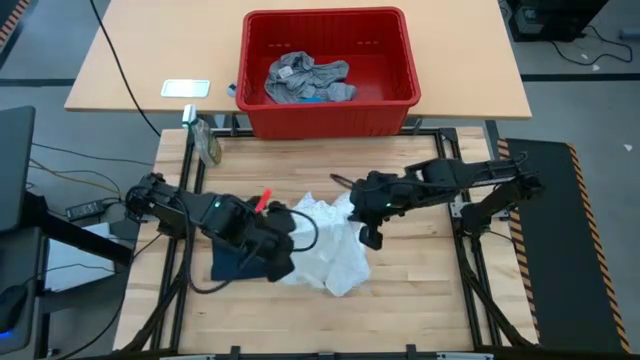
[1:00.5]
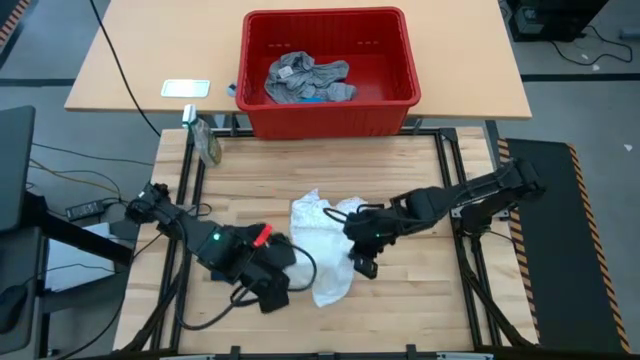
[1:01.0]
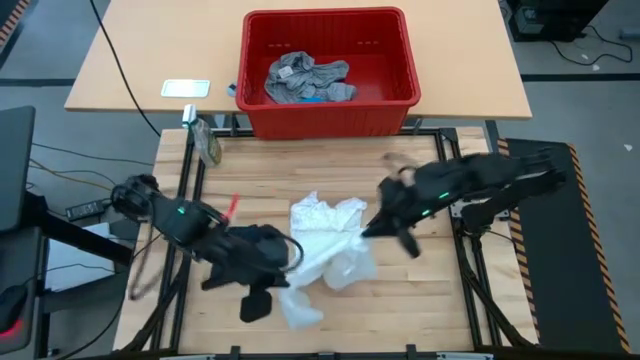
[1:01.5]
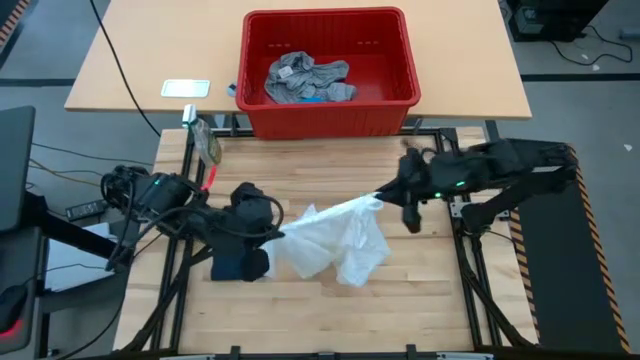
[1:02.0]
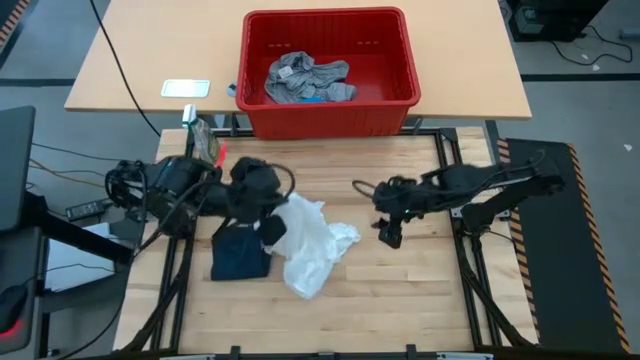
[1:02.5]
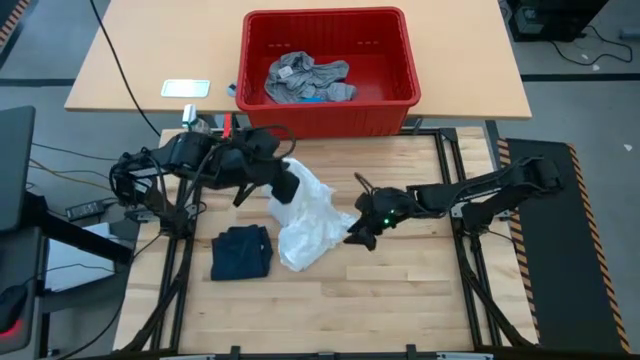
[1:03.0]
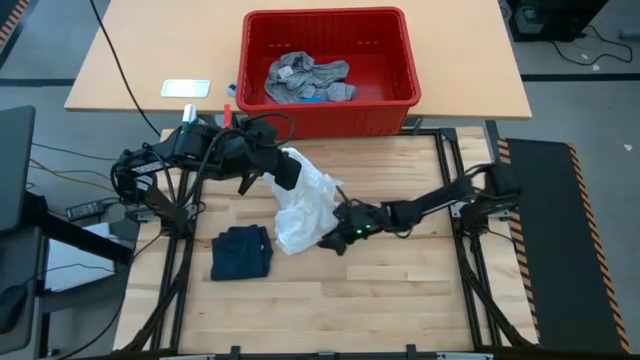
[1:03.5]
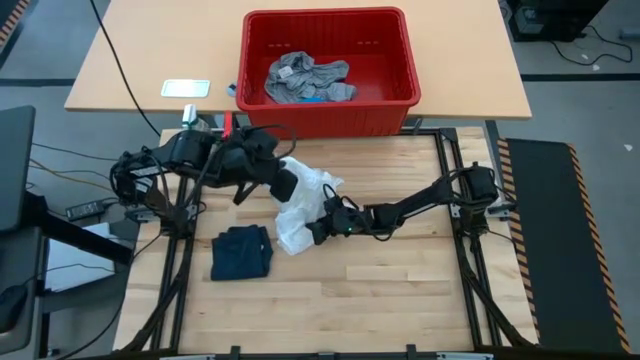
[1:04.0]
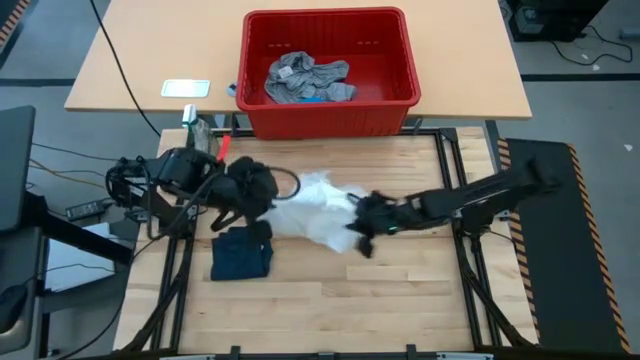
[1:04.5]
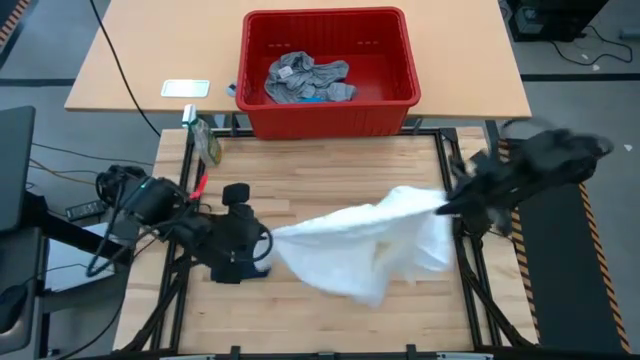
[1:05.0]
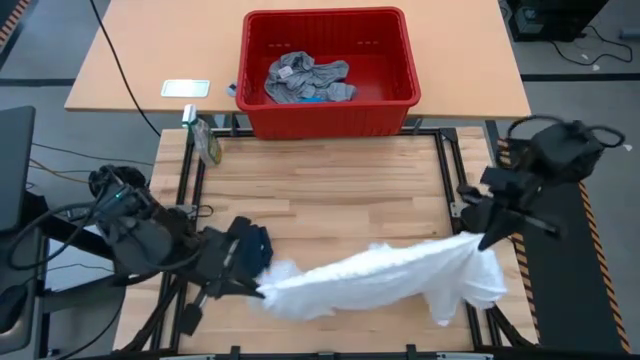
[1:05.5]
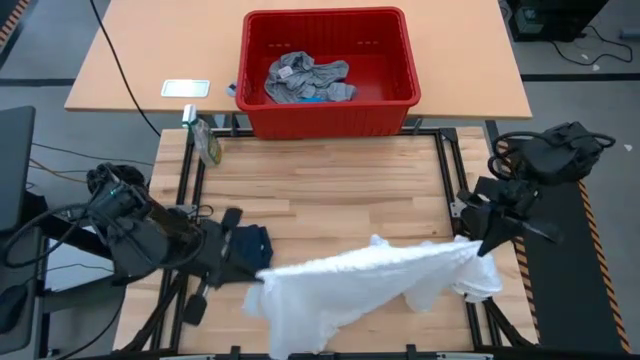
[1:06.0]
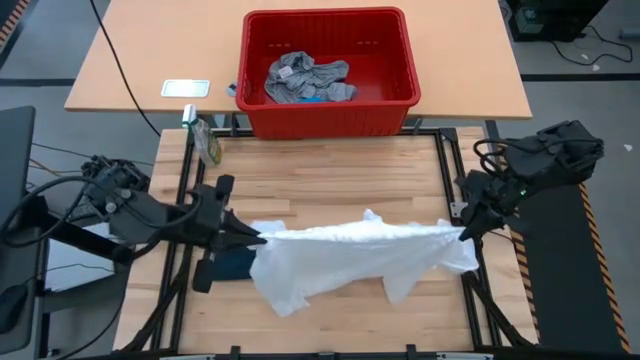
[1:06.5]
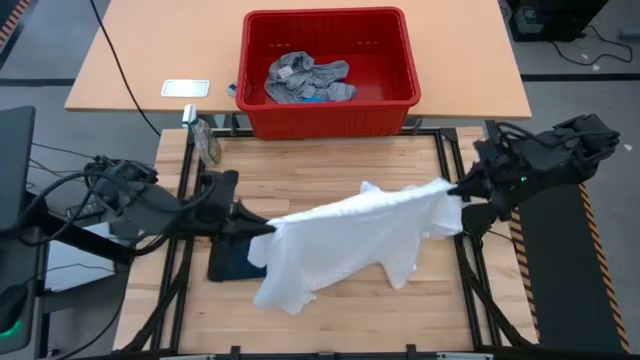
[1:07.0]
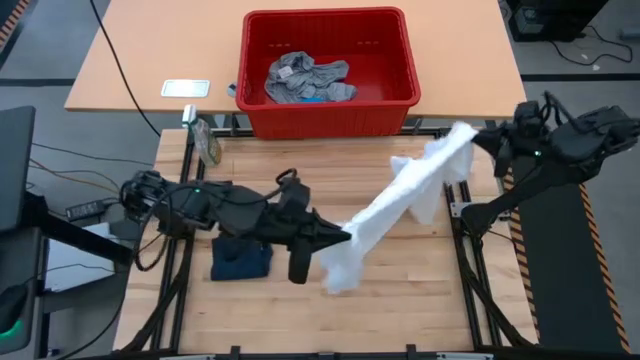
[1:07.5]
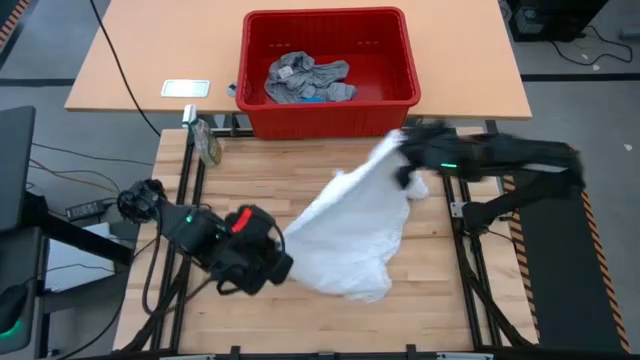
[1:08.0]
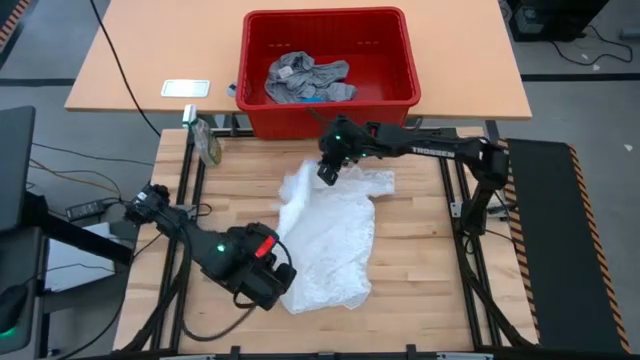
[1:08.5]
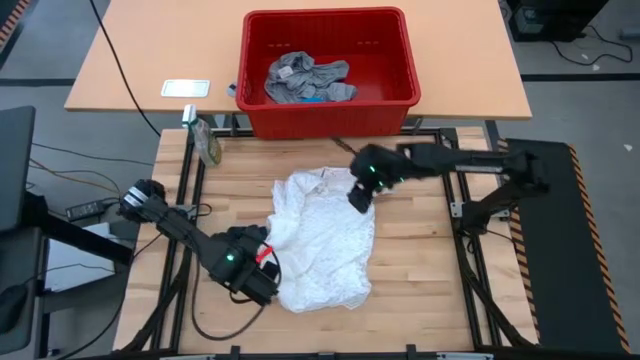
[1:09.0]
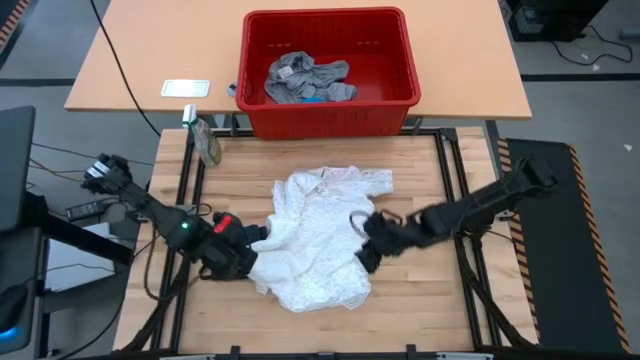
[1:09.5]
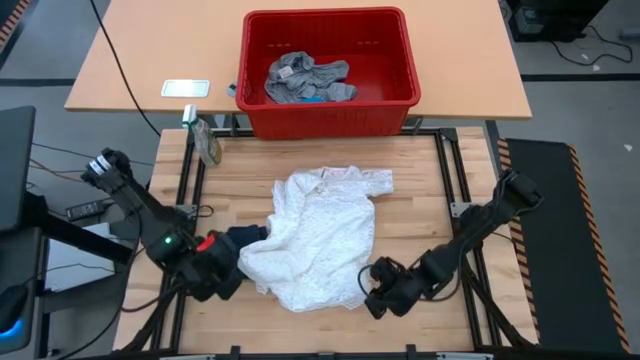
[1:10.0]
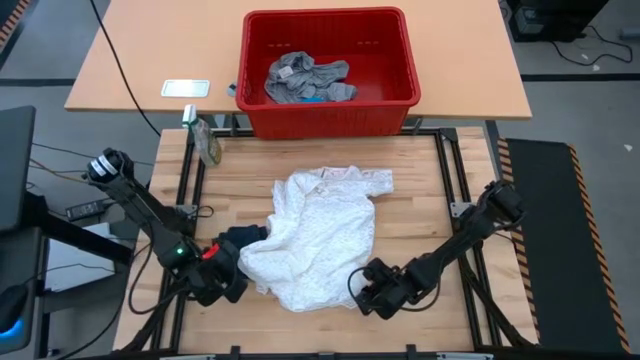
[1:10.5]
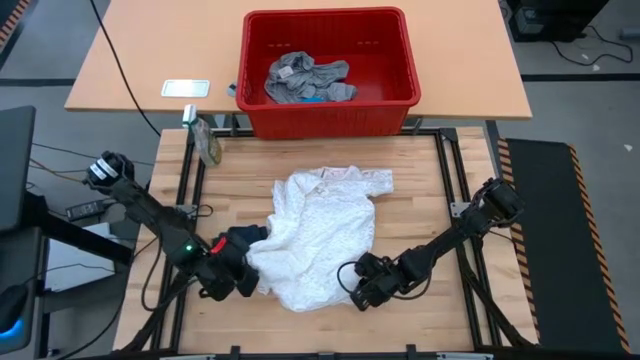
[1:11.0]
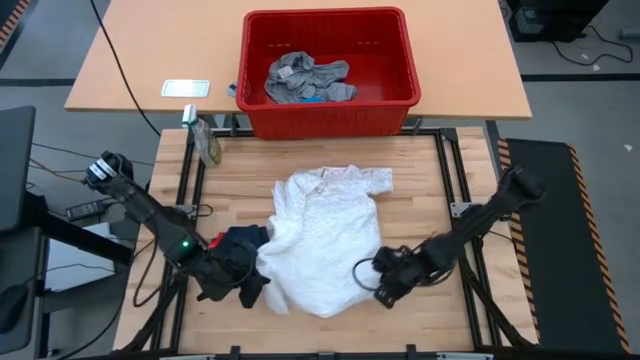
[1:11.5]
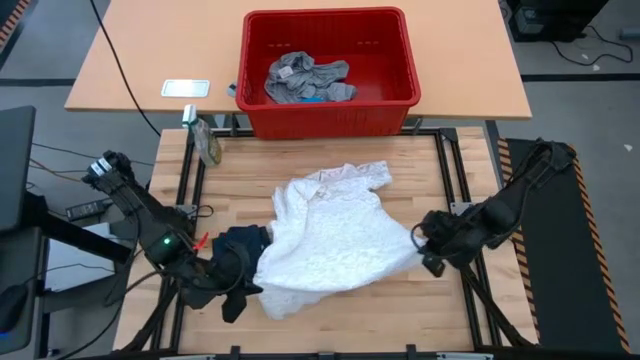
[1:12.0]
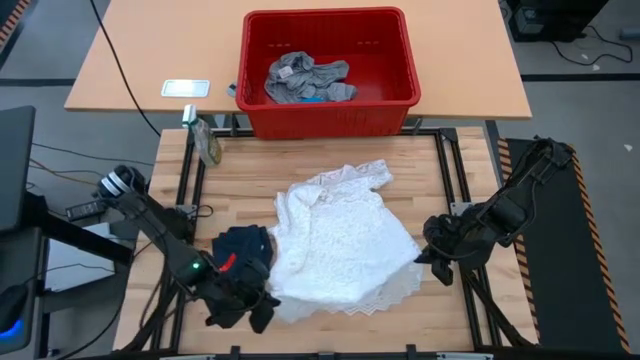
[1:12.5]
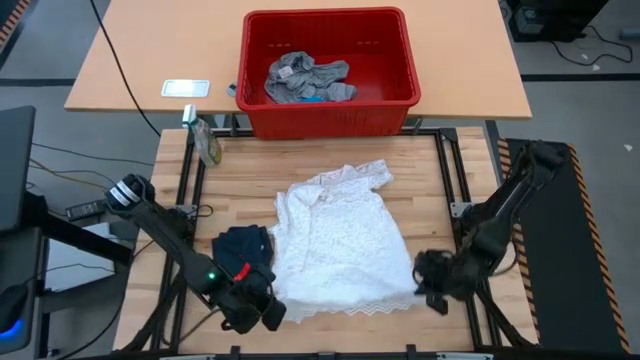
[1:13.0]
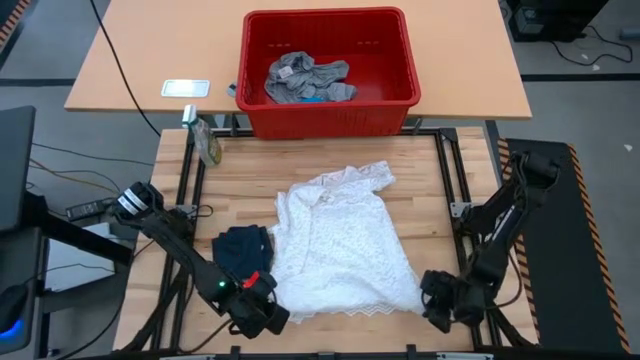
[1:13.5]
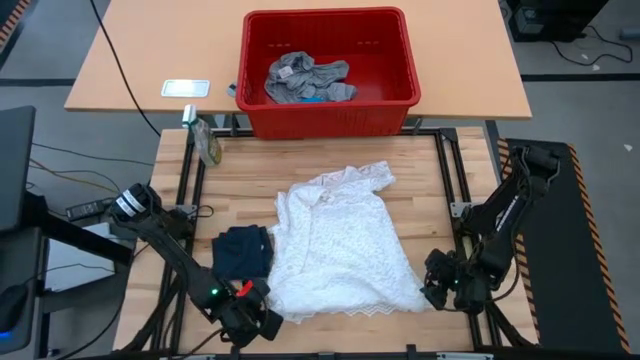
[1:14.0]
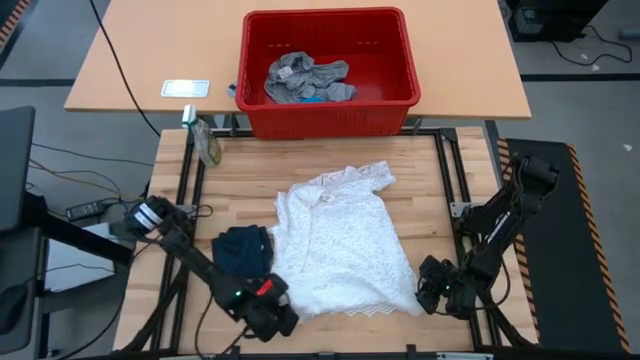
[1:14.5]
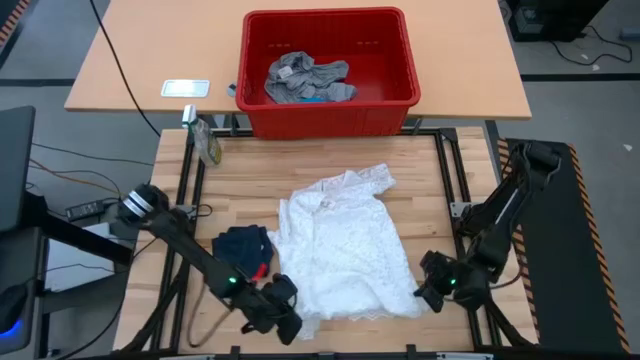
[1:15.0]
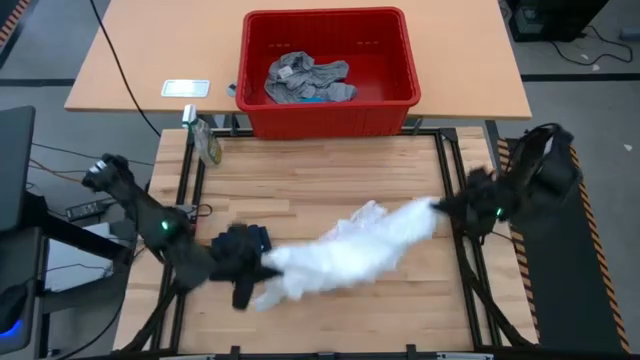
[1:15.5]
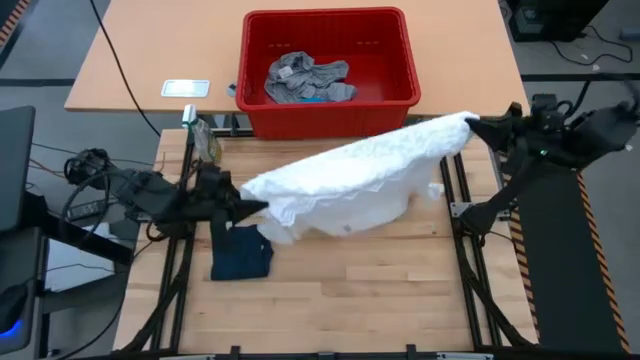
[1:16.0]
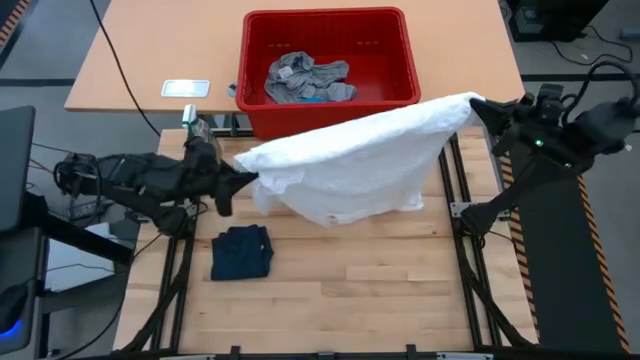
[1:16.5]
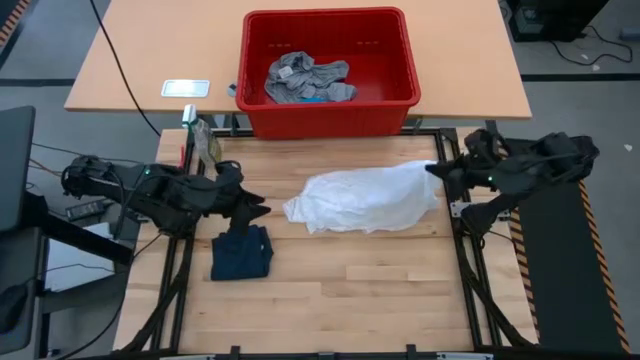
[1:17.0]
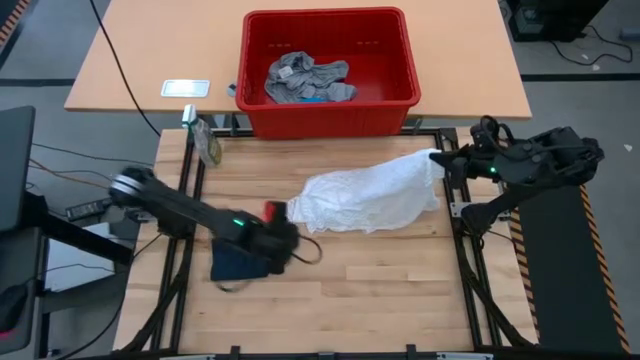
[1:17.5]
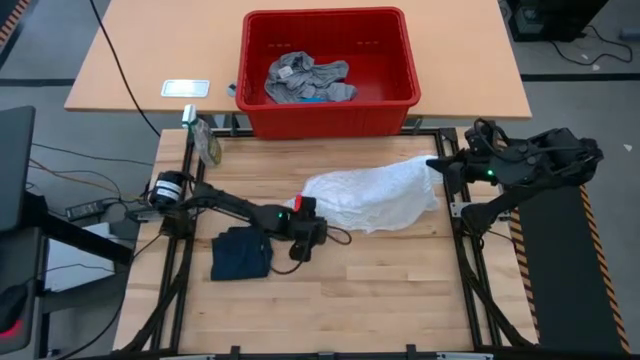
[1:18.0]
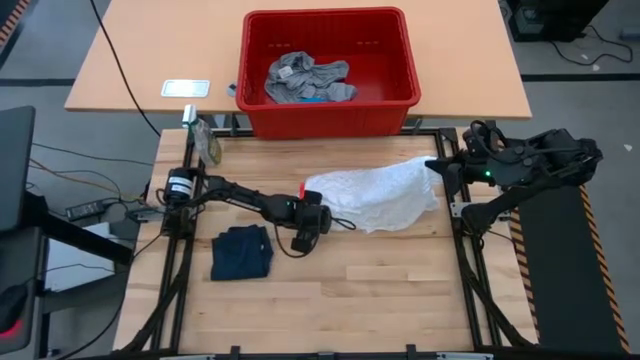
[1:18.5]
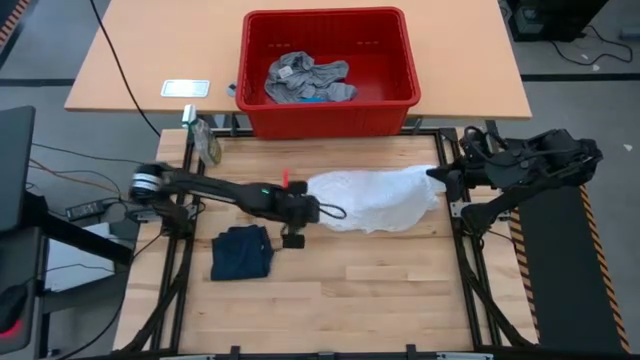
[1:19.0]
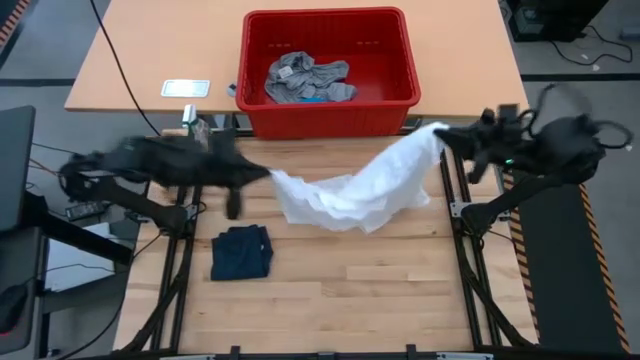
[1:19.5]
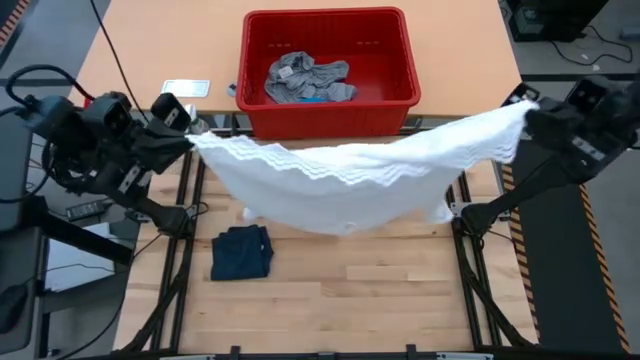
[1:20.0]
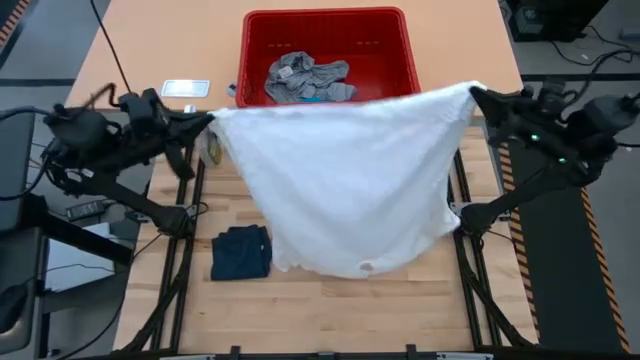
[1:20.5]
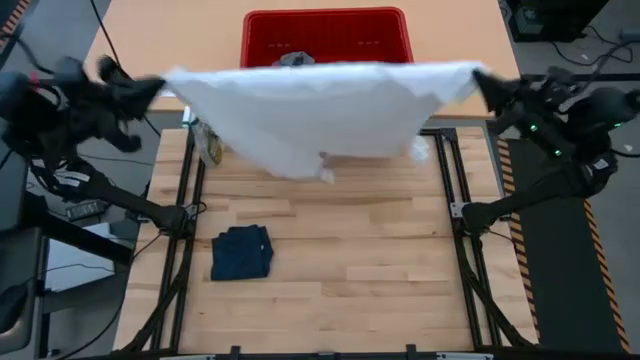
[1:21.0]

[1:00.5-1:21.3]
Task: Fold laundry
Fold the white dress

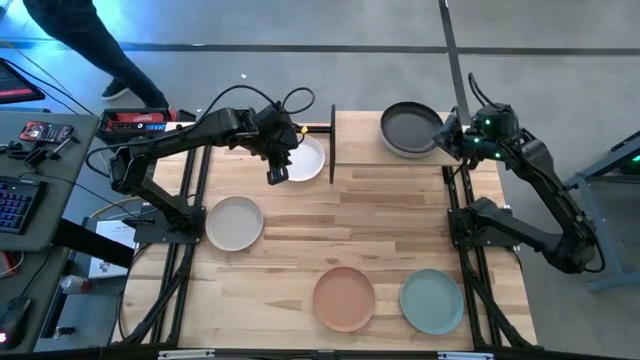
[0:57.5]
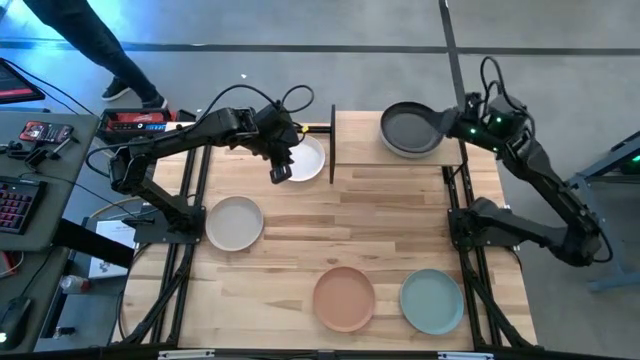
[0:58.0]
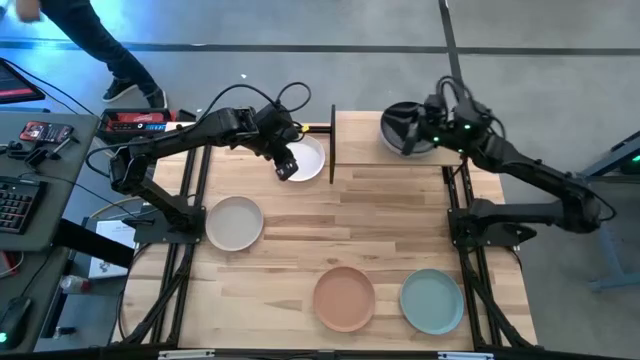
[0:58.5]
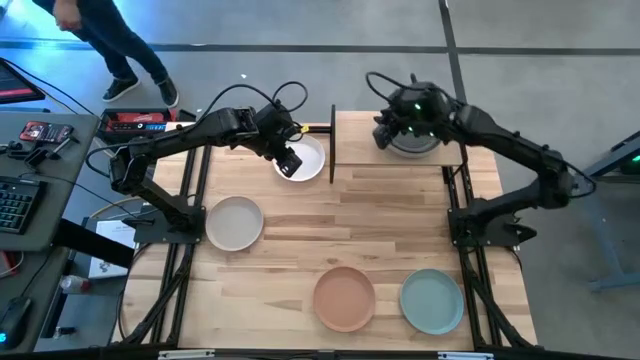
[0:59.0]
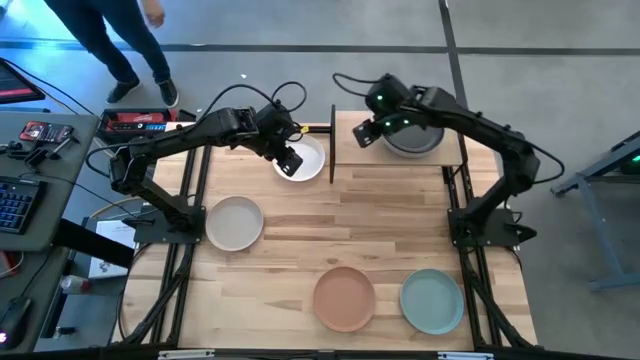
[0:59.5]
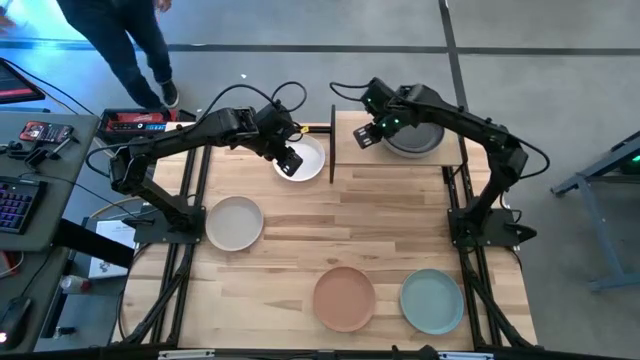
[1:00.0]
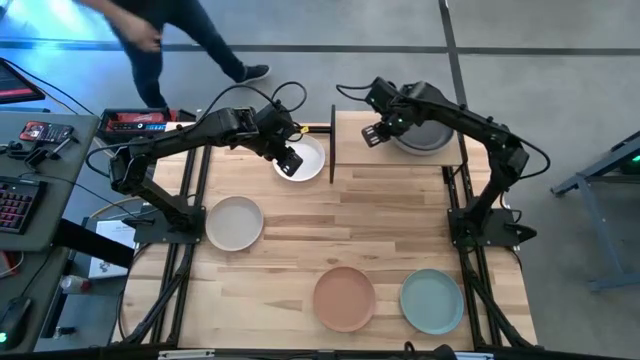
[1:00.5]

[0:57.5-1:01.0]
Task: Place and stack plates onto a shelf
Adjust the stacked plates on the shelf
